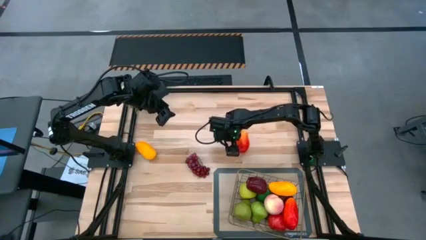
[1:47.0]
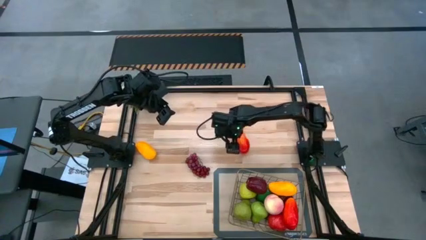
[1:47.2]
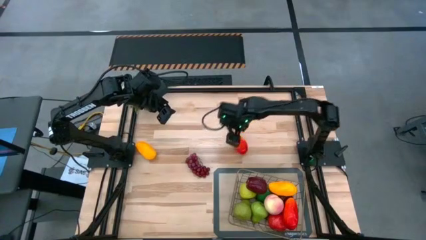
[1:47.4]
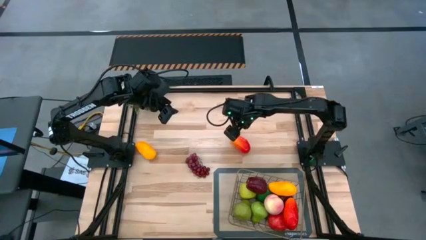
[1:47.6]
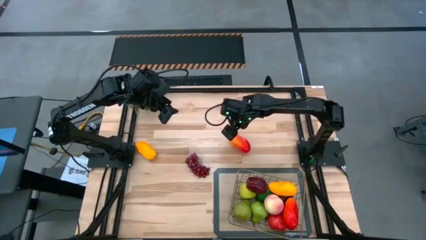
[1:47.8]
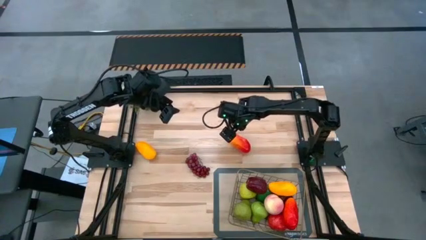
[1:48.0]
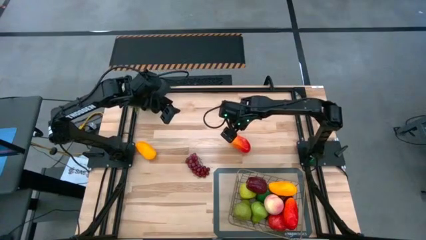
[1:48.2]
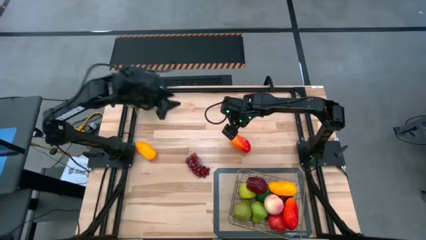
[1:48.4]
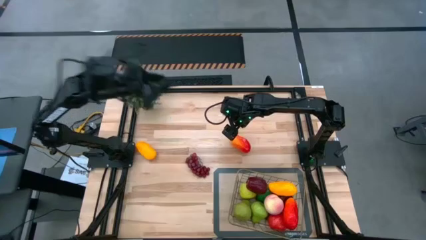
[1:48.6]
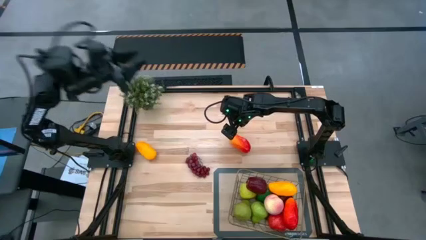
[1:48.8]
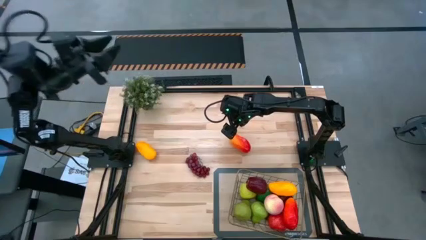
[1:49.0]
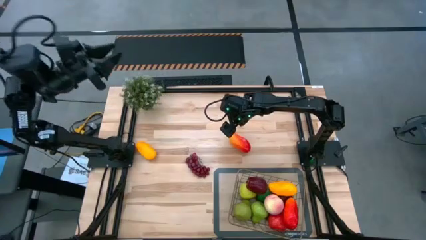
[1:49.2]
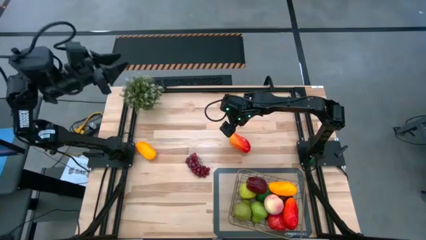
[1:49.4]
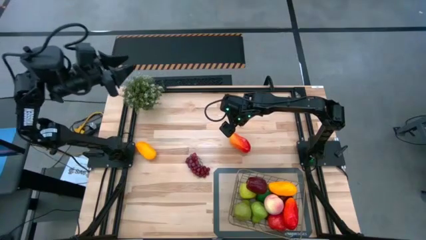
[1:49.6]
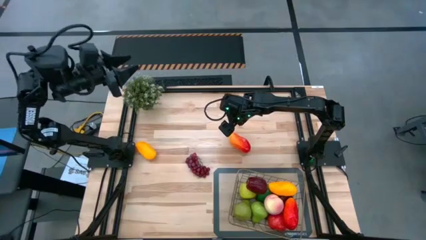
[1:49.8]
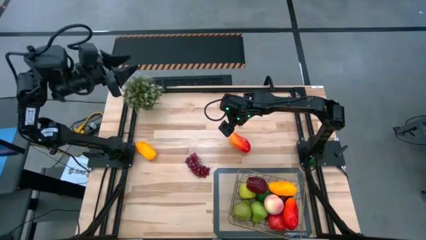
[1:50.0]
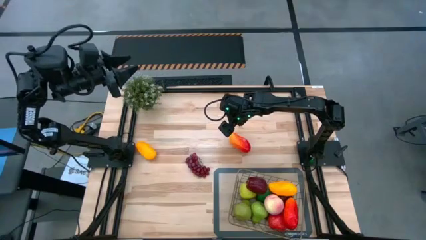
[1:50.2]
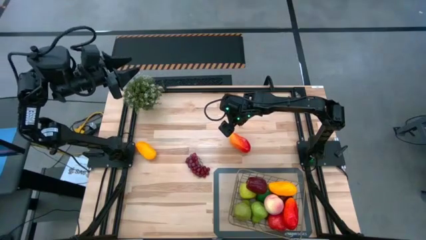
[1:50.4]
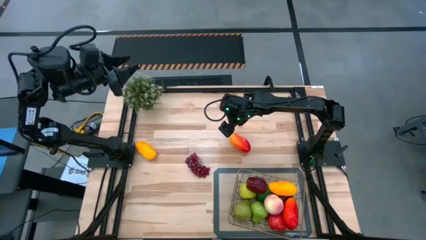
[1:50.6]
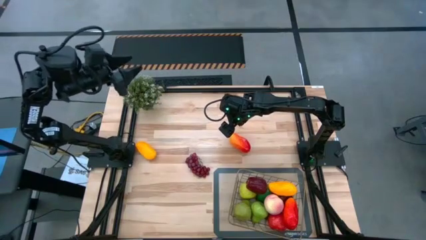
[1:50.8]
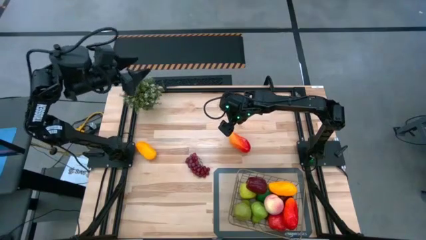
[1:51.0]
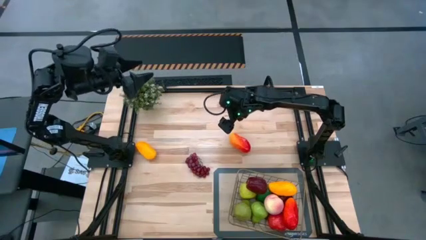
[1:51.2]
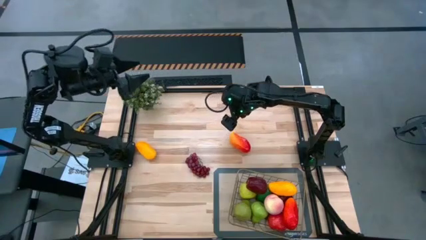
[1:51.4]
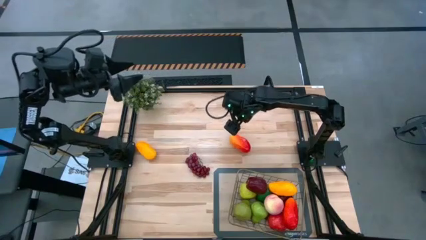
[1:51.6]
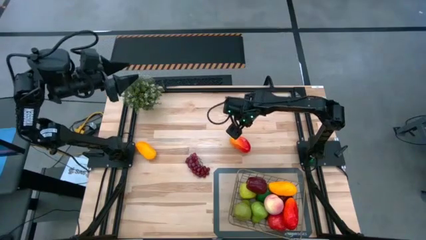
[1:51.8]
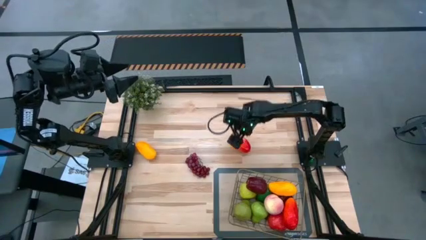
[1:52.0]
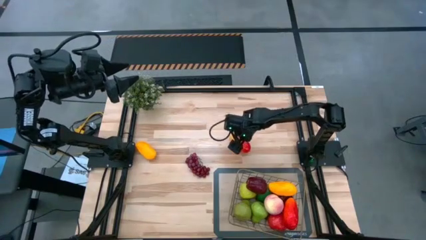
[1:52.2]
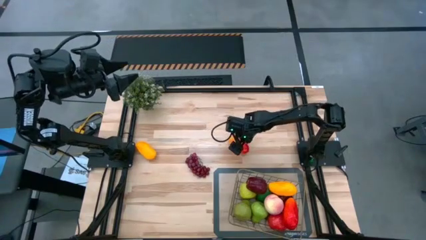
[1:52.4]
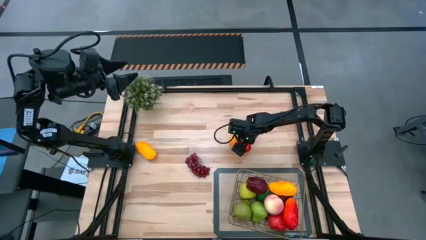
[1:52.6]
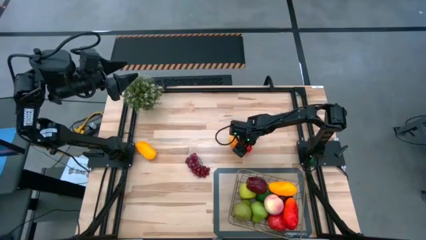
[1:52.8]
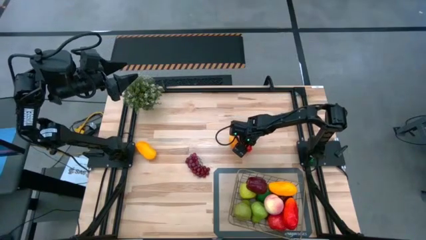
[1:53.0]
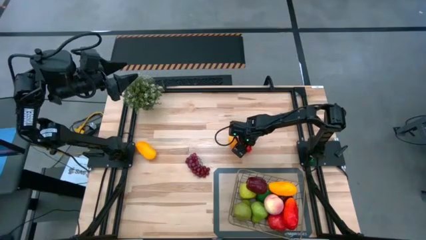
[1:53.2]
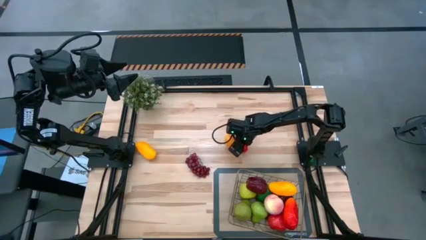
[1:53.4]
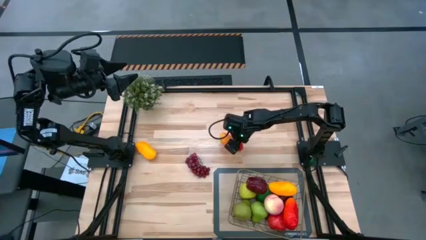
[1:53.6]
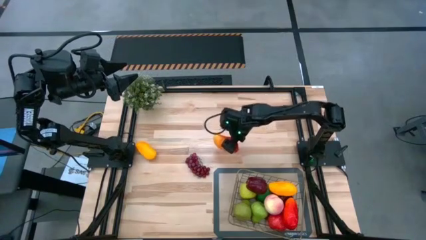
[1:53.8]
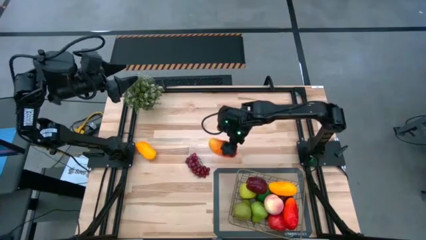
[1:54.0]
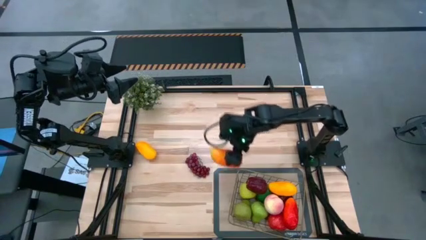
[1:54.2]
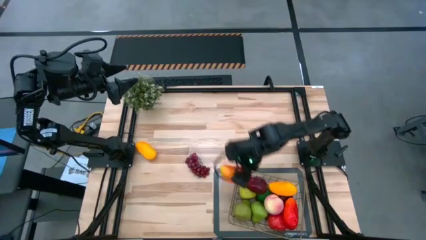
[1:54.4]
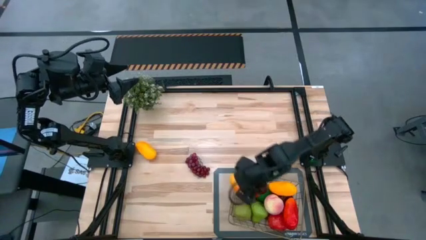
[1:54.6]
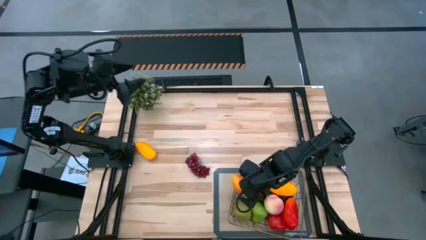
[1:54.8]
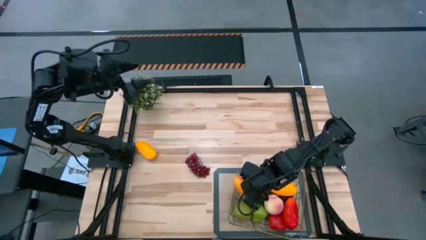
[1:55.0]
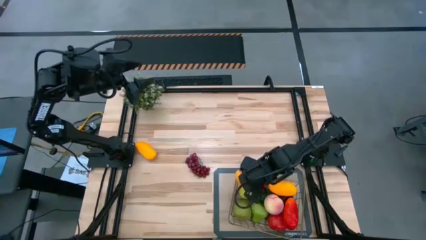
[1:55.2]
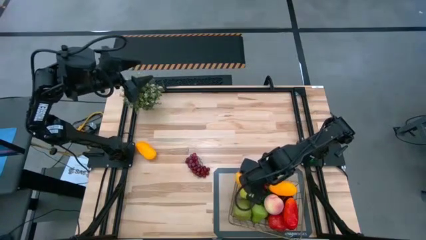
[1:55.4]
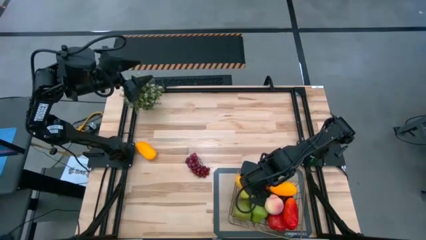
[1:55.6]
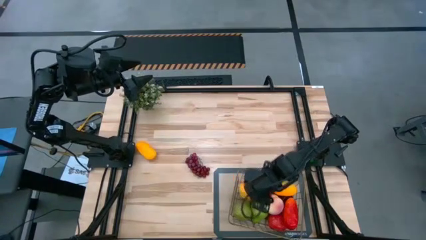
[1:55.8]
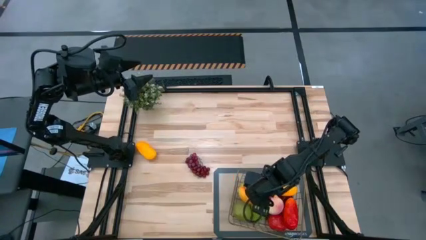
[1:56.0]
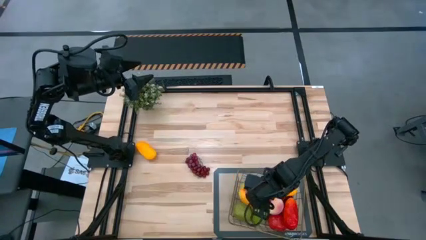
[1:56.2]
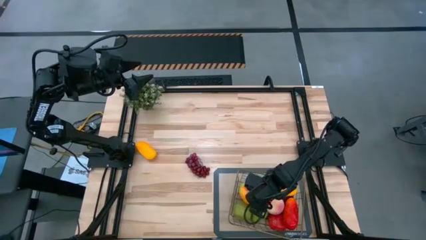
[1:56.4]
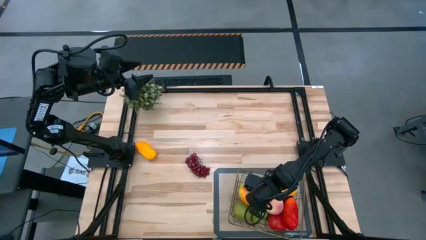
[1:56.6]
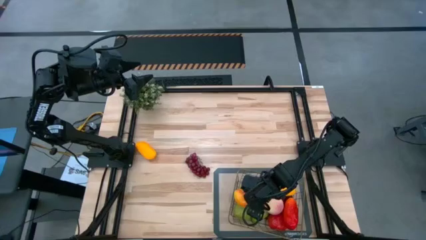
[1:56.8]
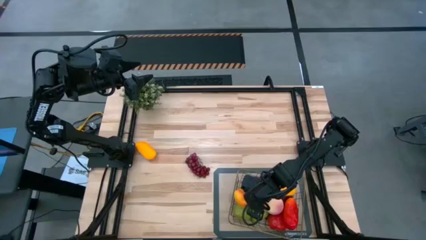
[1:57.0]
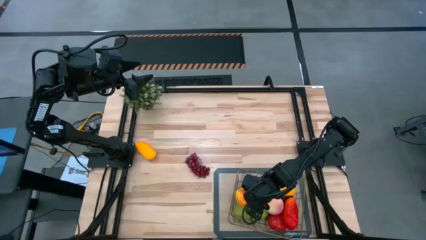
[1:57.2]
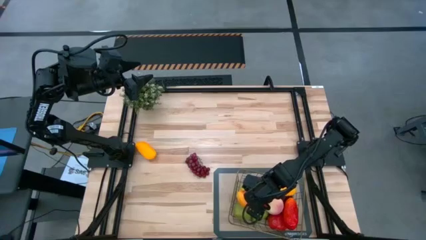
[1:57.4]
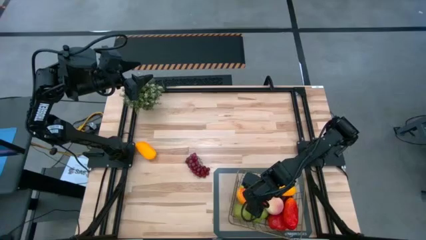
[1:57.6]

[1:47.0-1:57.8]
Task: Build produce basket
Put the orange mango into the wire basket

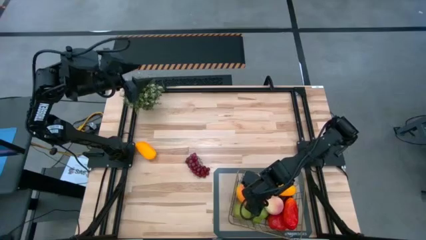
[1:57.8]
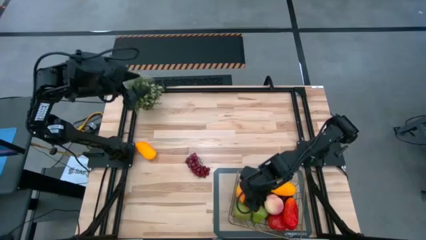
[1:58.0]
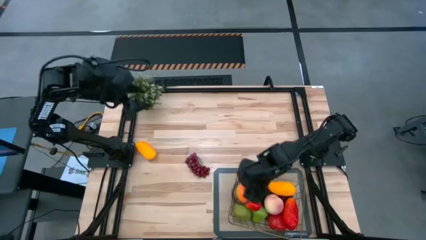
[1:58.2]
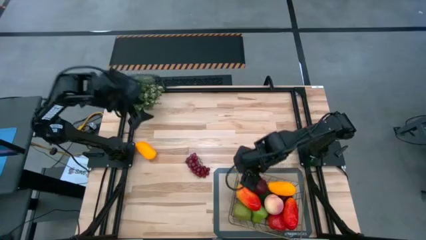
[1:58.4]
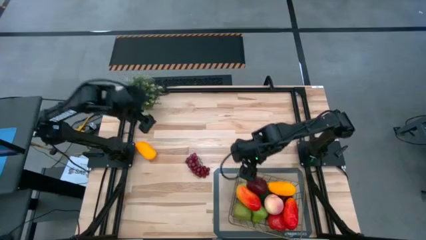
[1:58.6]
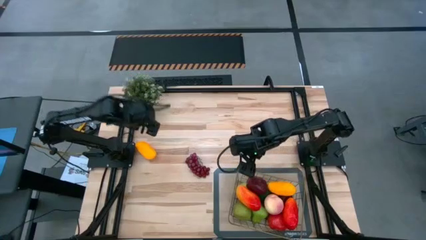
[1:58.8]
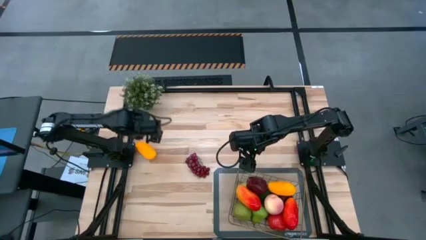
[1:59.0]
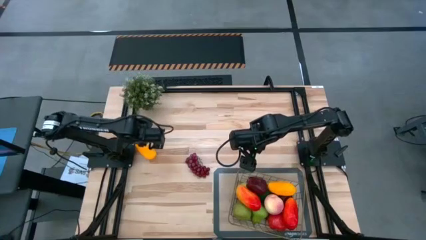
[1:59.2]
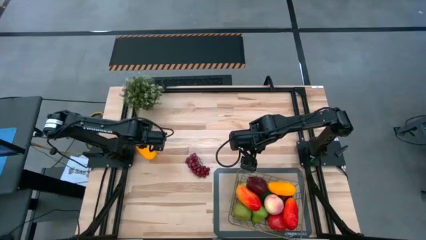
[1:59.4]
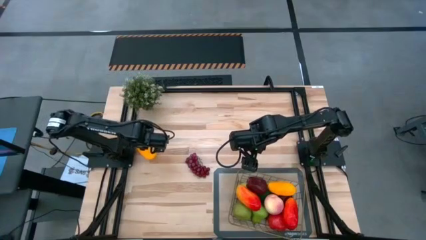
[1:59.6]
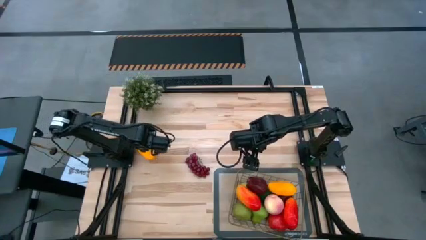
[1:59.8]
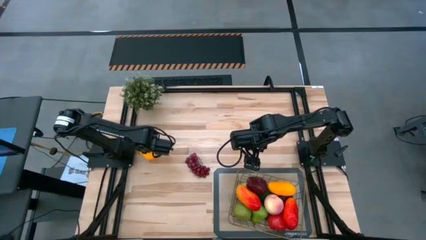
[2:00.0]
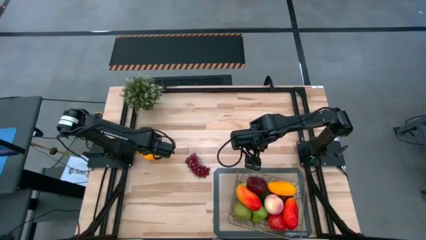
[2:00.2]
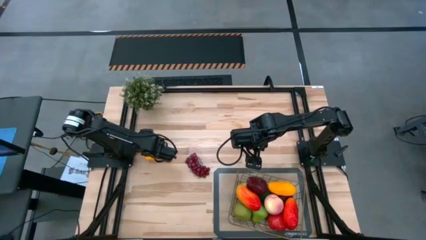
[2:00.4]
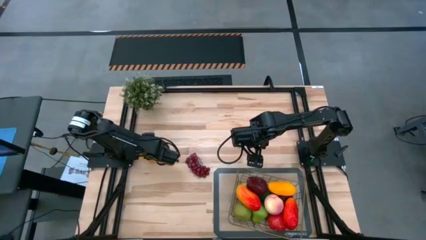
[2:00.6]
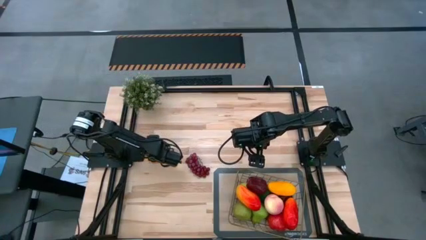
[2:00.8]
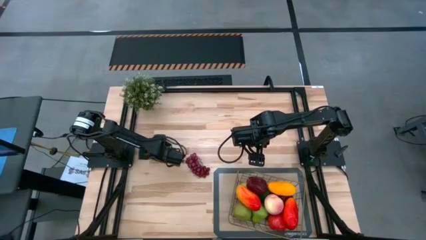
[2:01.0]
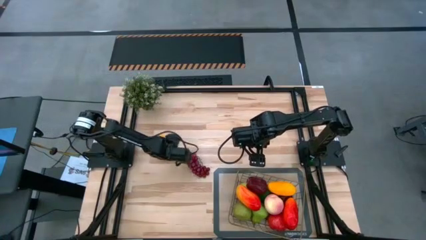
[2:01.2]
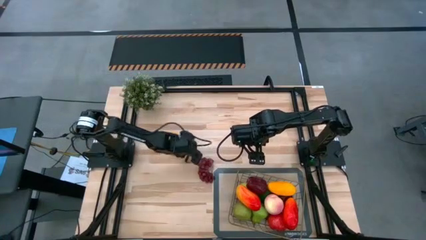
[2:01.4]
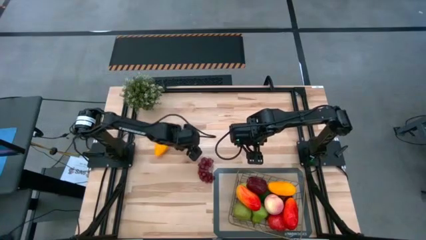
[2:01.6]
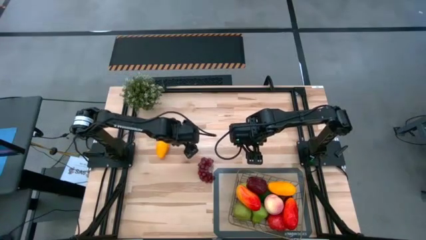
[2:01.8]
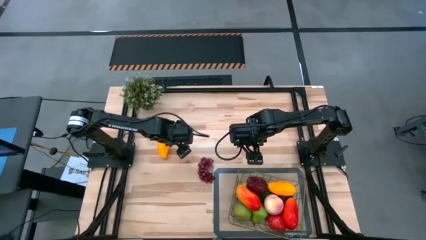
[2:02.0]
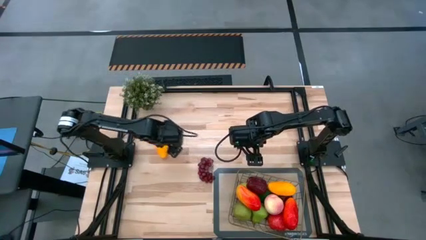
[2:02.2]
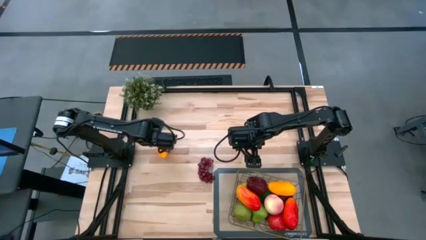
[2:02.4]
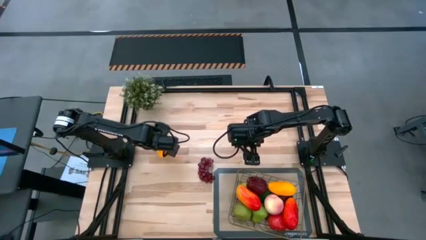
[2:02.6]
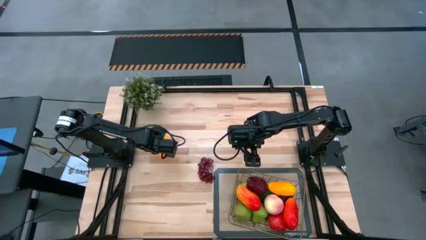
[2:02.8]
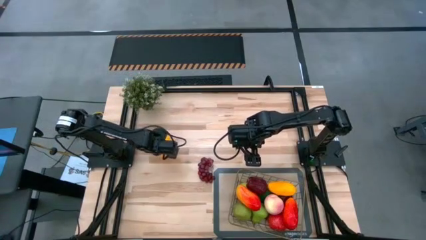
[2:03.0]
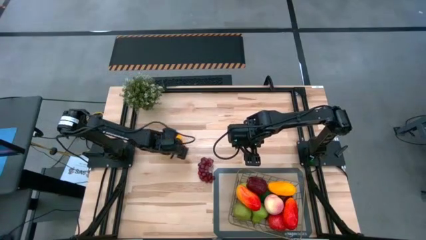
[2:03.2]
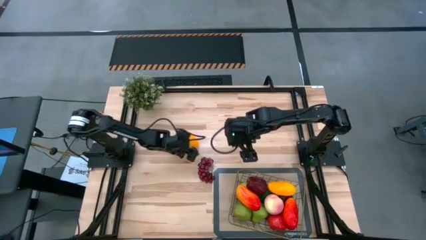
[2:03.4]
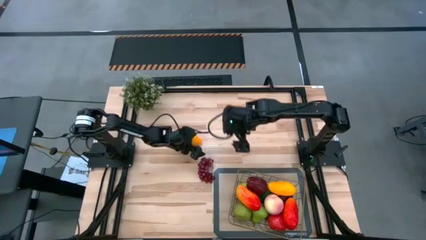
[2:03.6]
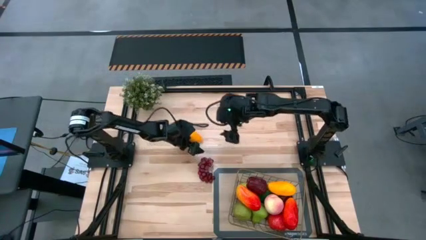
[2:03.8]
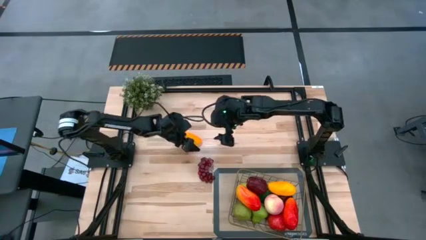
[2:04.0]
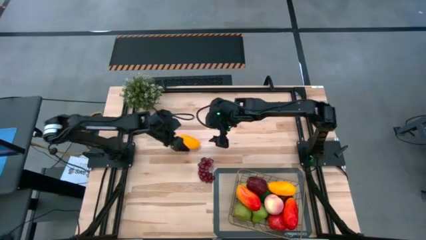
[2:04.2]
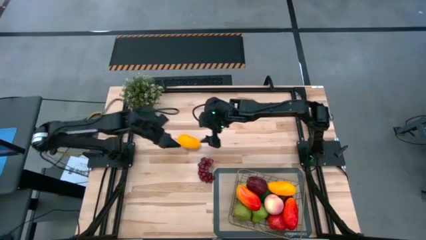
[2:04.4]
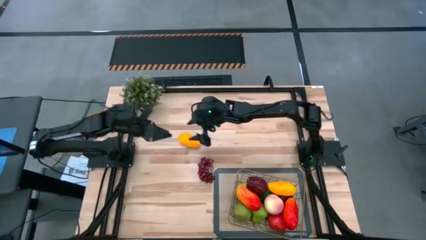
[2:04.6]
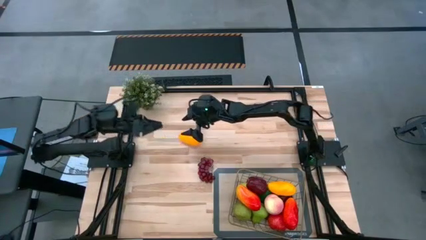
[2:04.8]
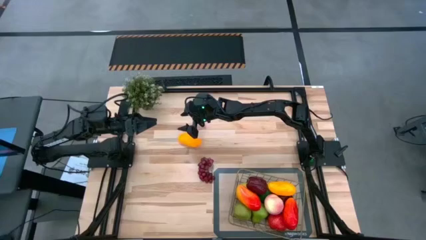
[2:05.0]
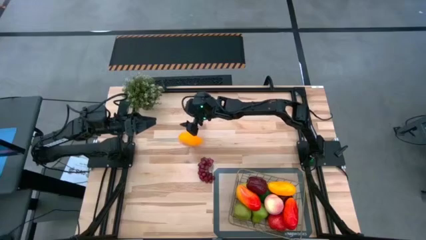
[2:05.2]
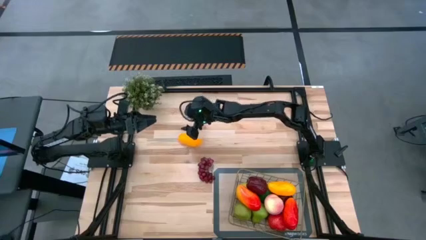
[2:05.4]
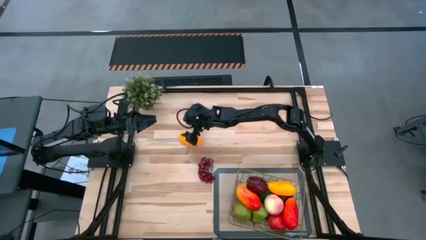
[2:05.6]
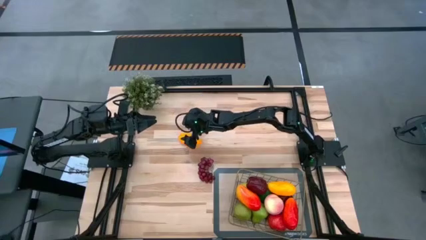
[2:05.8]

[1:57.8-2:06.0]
Put the yellow mango into the wire basket
